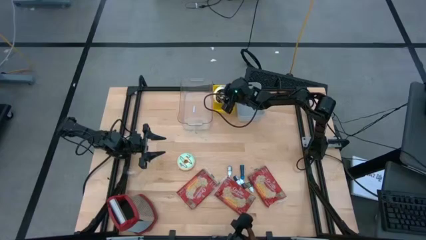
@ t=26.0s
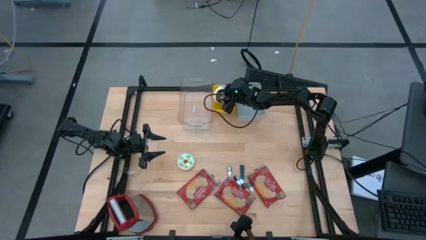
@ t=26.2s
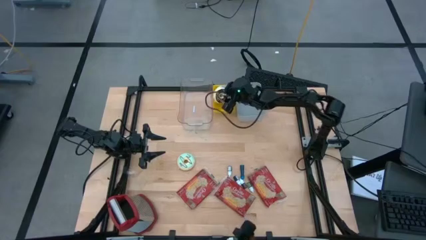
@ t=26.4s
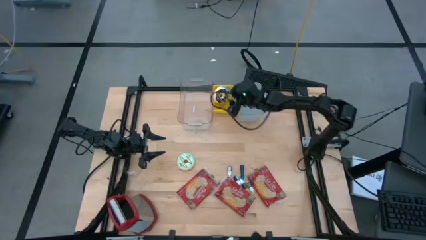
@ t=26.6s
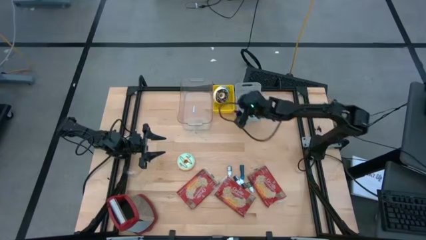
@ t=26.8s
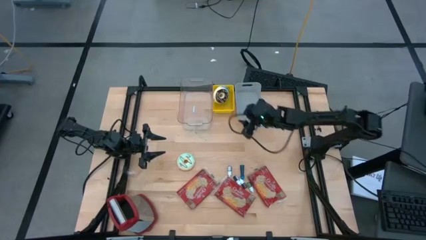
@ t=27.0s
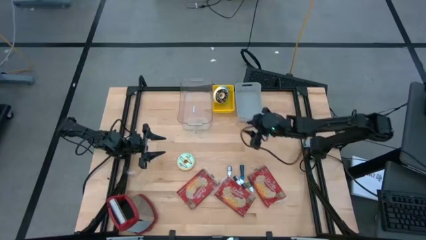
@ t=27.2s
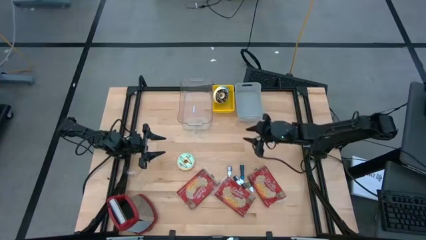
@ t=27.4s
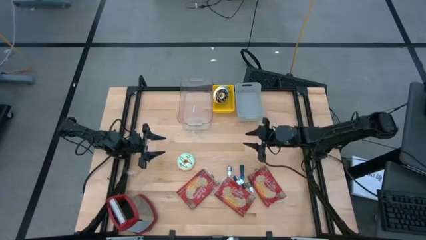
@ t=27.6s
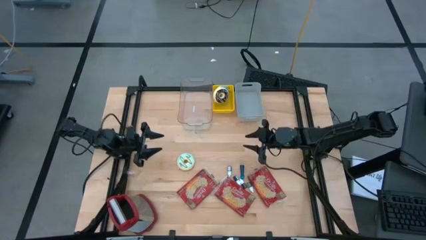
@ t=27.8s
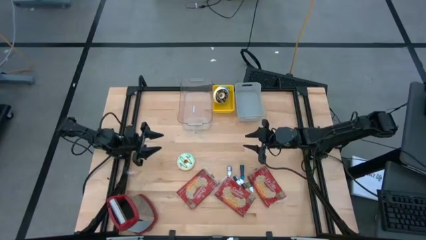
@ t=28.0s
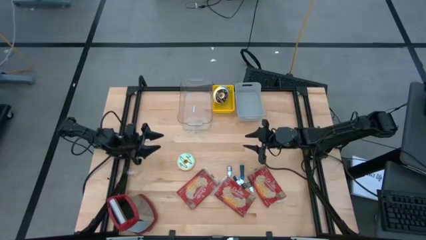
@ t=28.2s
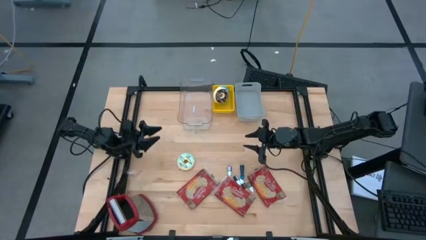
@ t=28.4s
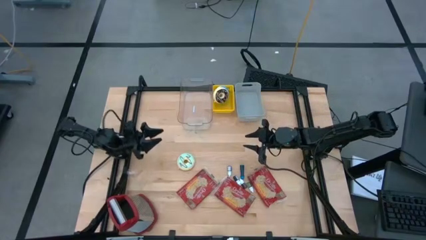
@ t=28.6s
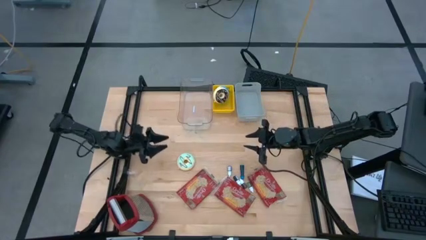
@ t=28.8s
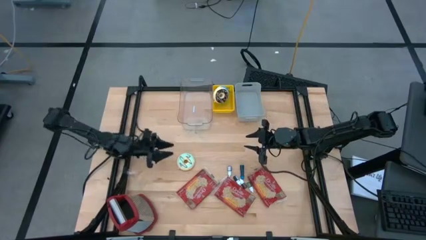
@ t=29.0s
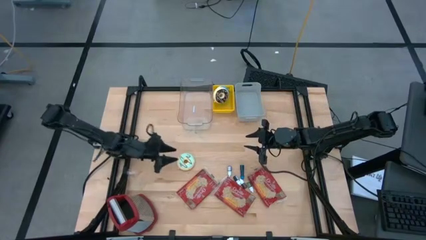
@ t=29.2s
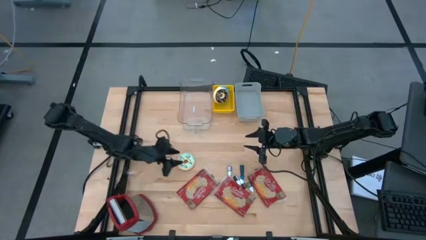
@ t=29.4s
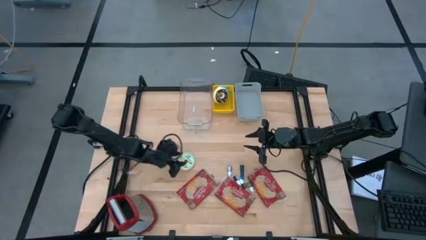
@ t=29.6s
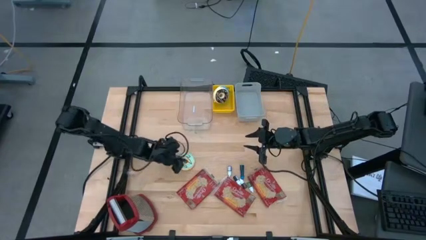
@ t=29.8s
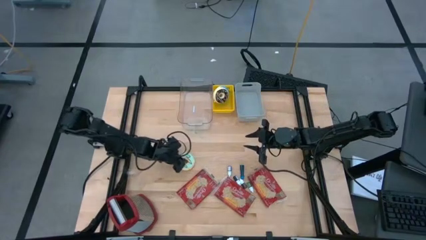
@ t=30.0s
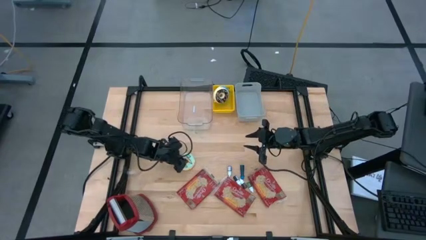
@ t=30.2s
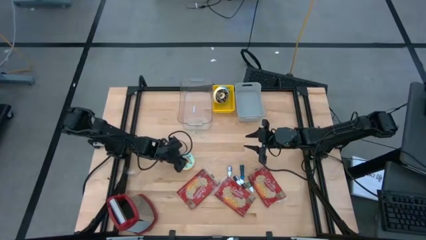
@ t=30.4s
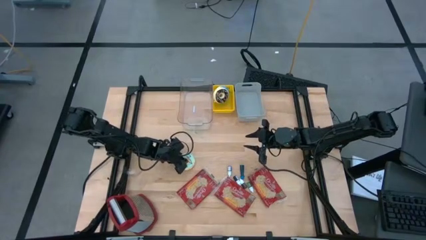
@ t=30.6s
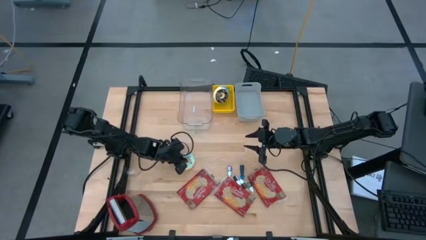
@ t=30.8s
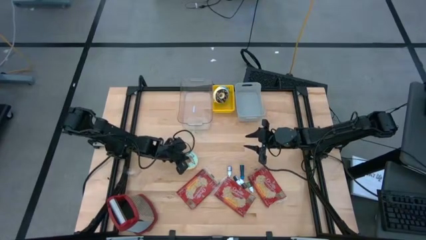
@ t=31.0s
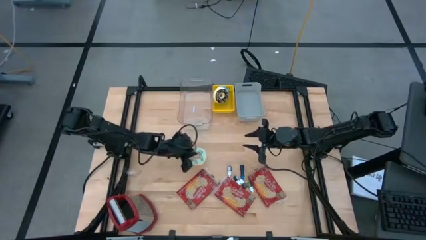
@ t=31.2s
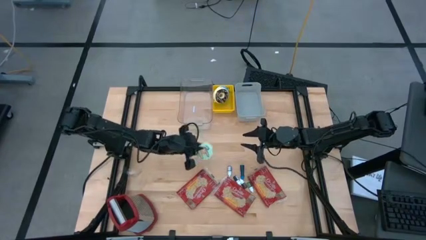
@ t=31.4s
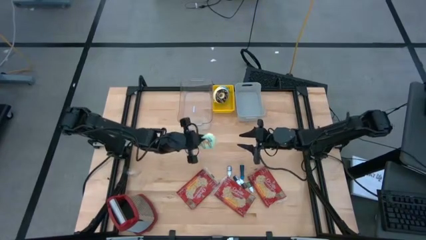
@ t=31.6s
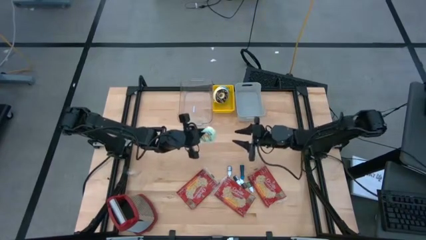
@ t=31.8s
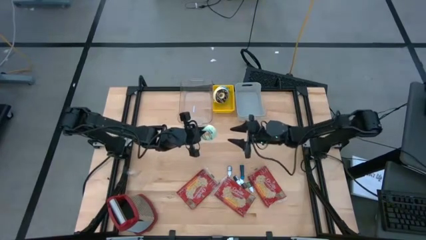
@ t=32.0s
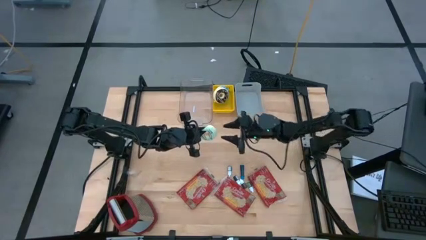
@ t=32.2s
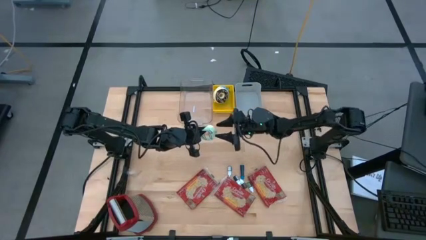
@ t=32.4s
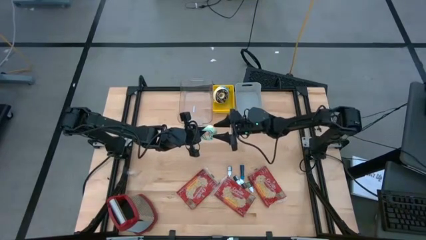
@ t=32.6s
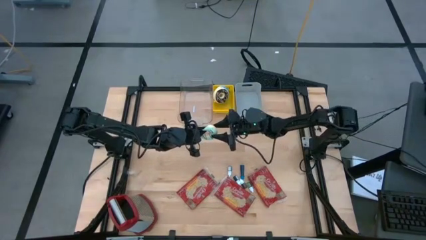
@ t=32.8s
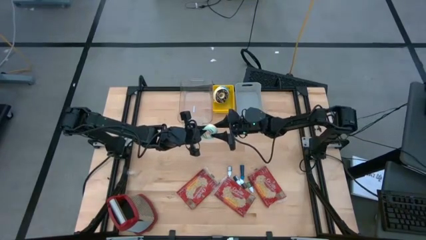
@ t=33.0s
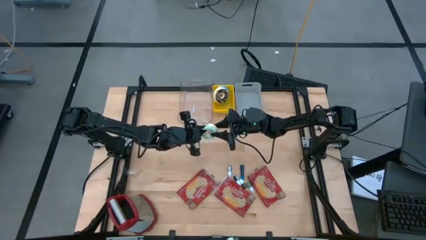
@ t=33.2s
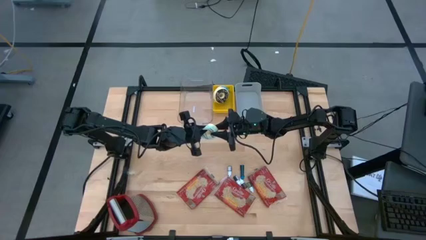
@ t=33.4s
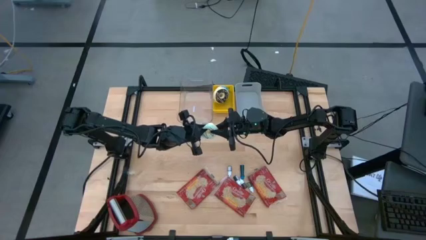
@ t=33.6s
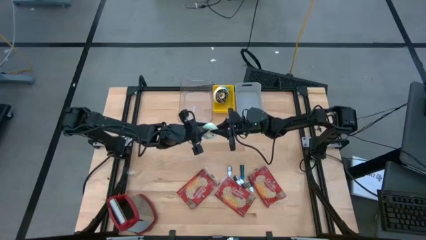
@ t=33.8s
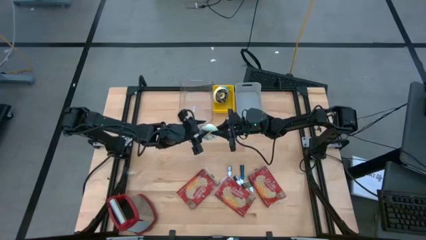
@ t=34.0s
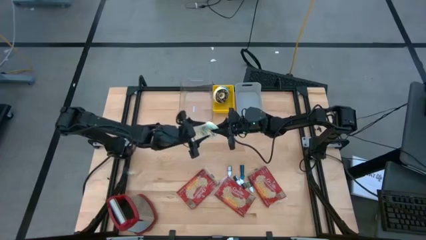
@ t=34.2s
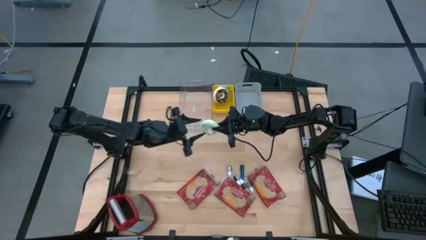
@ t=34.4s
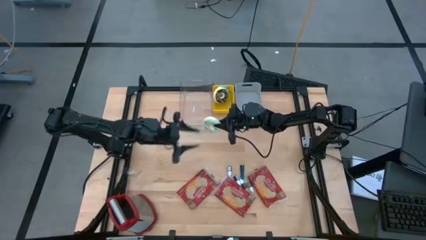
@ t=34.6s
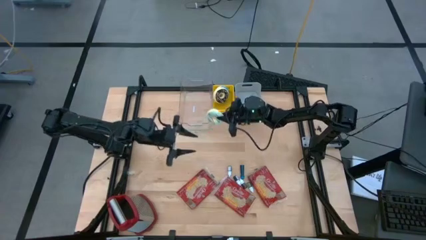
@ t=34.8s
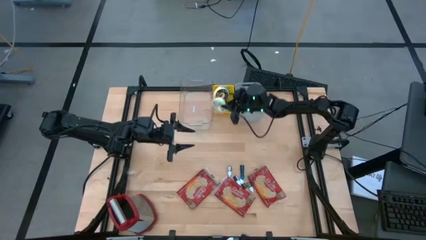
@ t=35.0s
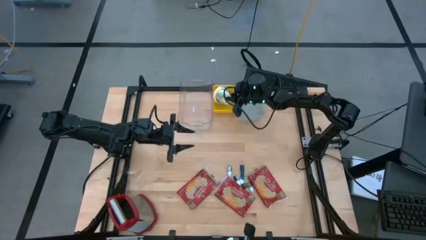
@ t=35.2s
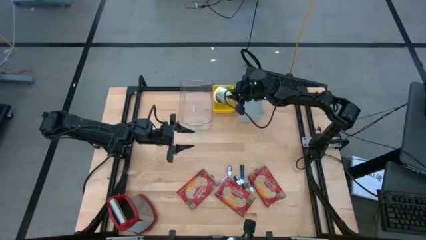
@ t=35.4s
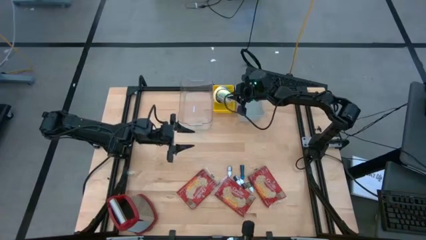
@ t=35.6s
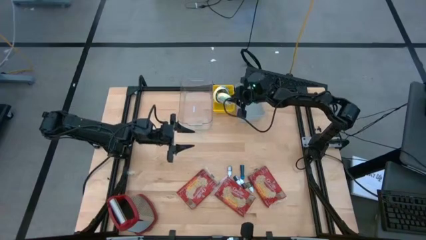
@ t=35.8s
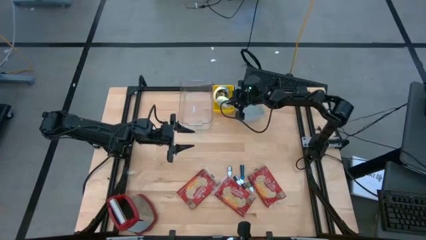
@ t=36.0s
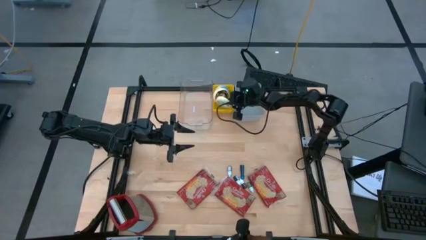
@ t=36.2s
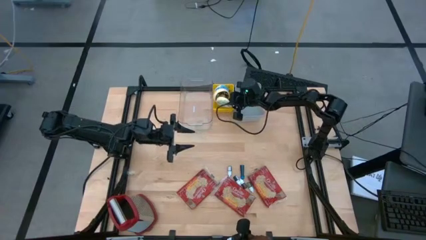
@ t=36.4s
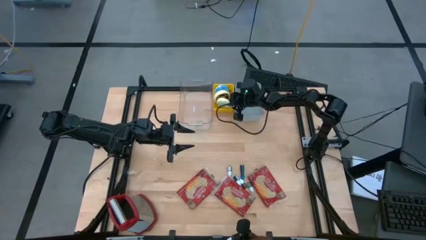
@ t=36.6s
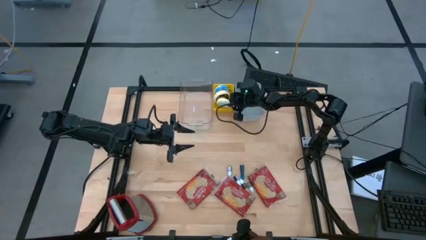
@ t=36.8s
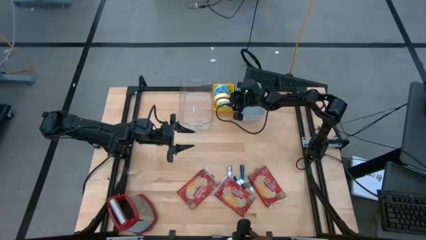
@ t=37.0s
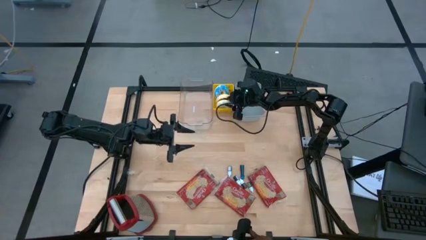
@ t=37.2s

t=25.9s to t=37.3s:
Put the light blue donut into the yellow bin
